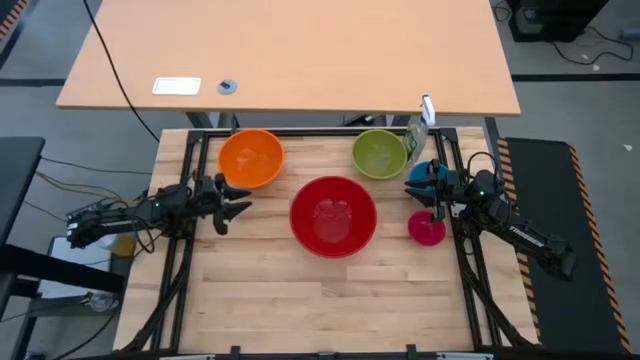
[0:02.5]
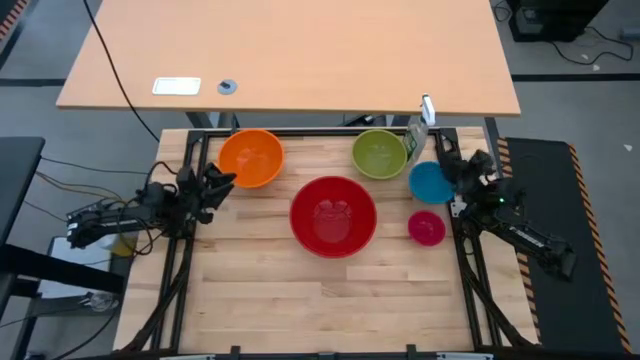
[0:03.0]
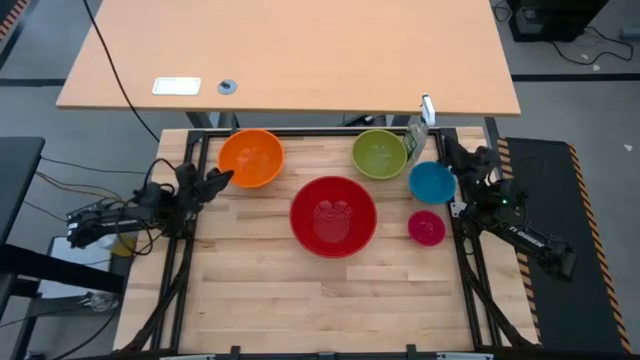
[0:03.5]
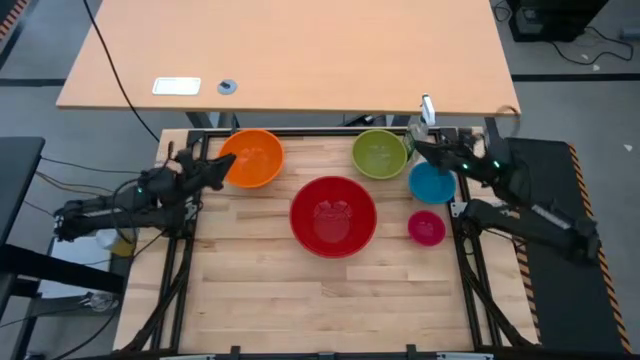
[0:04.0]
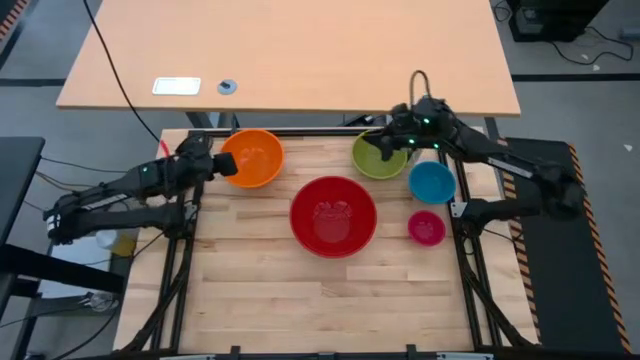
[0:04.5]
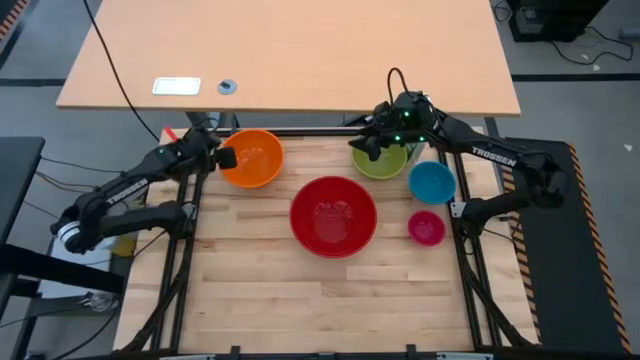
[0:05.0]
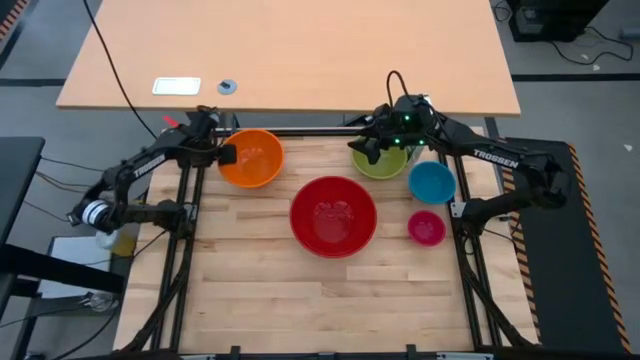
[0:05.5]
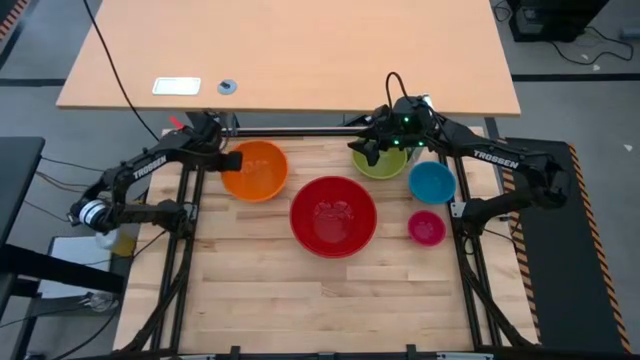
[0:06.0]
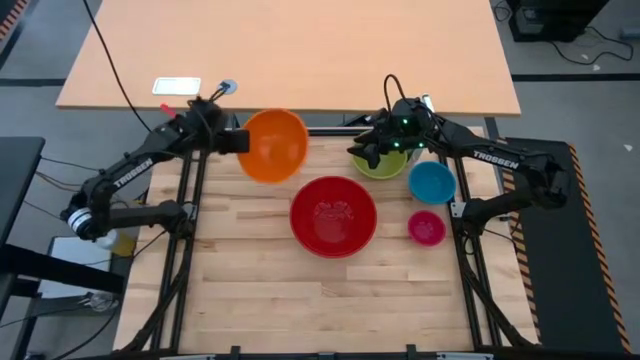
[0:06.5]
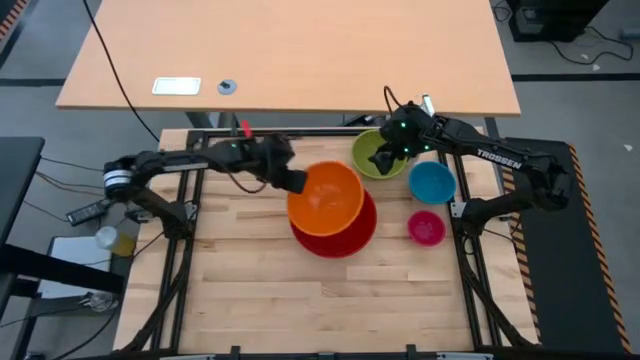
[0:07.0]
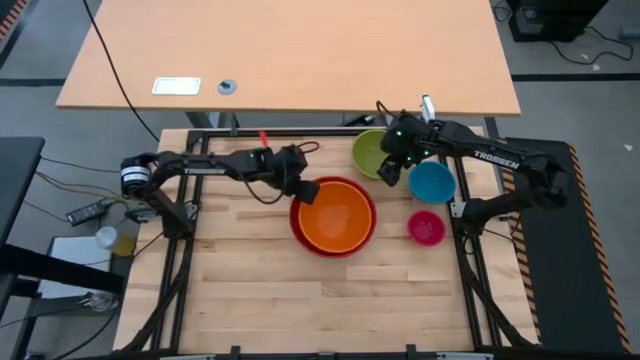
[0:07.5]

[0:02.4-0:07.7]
Stack the orange bowl on top of the red bowl

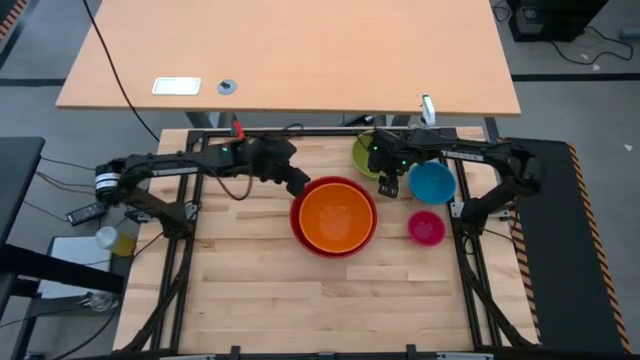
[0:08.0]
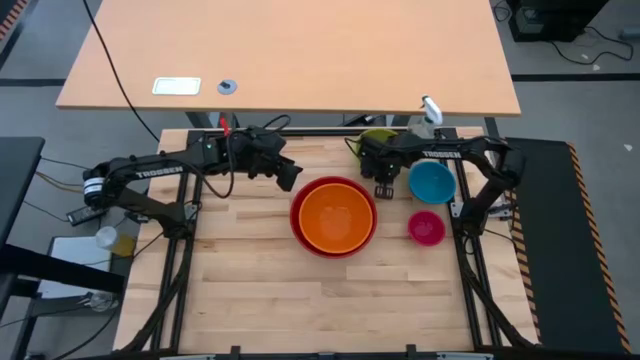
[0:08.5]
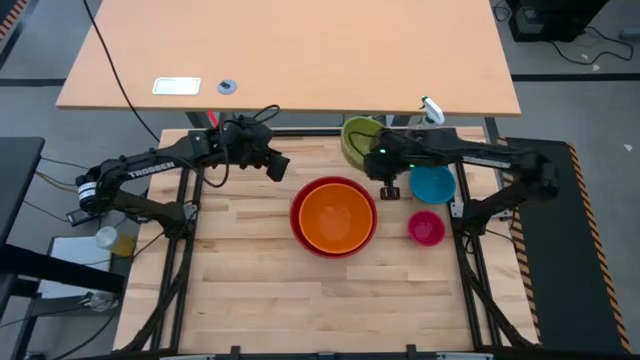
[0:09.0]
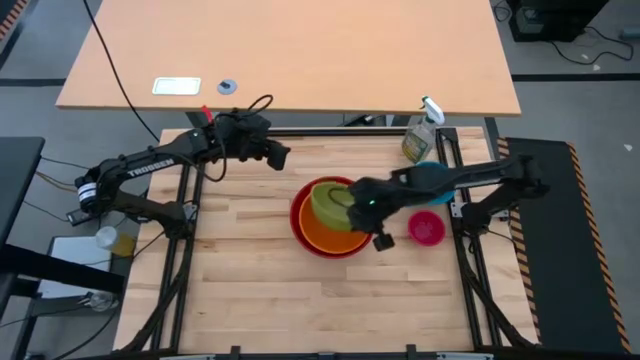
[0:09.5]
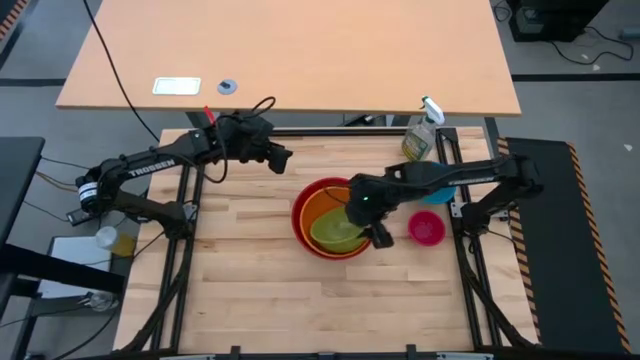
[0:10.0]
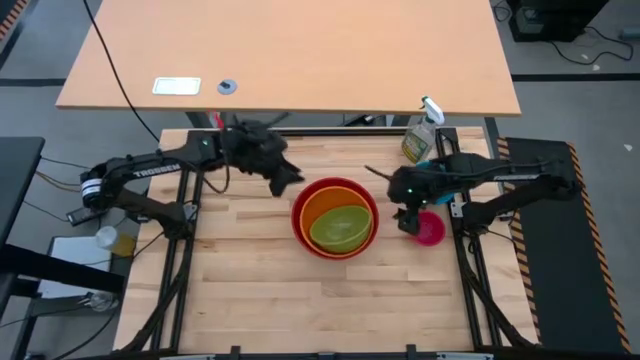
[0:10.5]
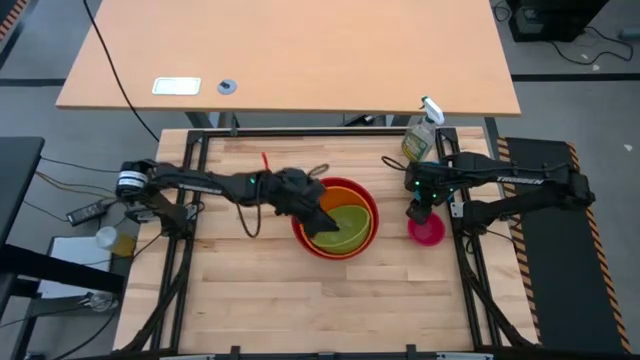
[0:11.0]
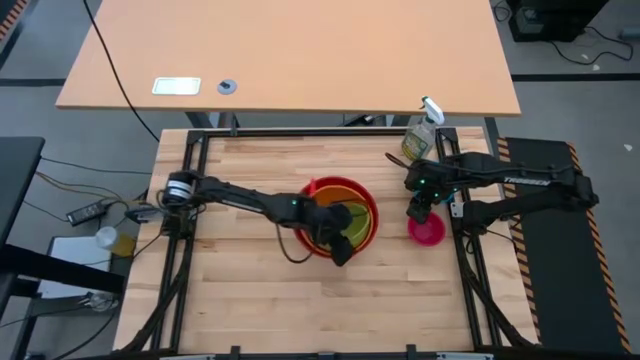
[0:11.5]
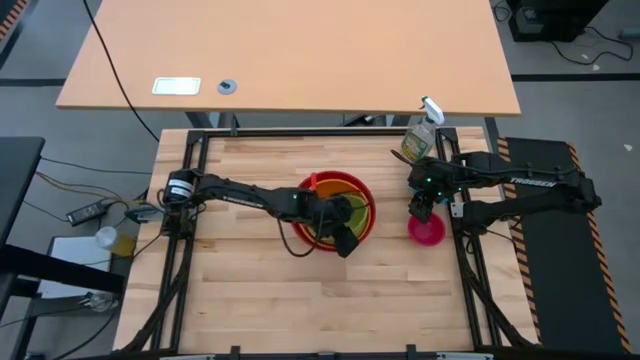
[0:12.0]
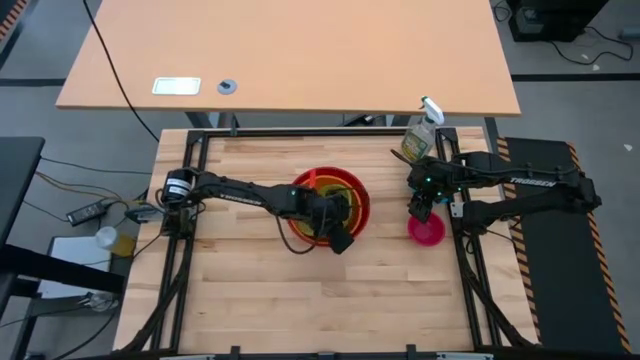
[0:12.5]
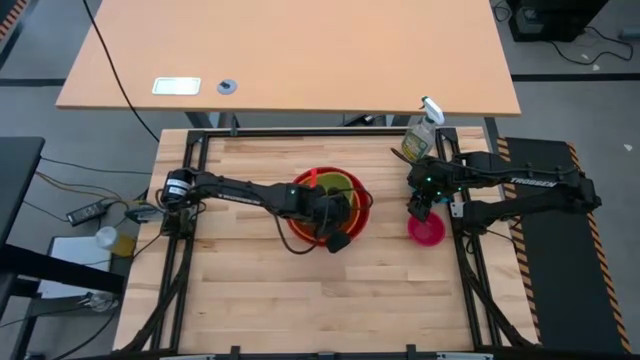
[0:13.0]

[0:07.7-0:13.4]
Stack the light green bowl on top of the orange bowl

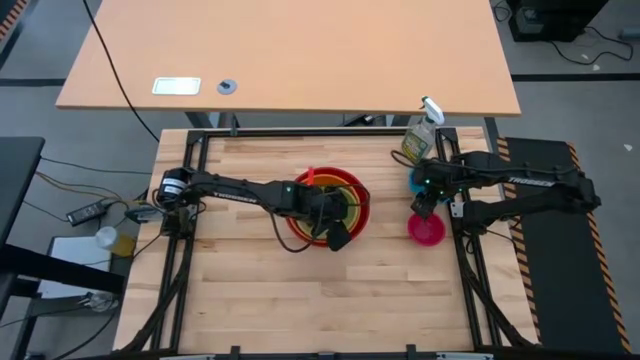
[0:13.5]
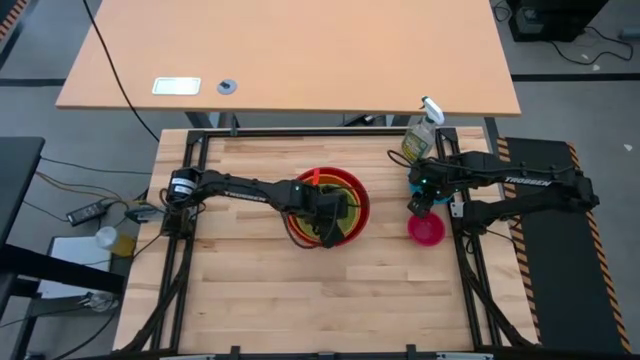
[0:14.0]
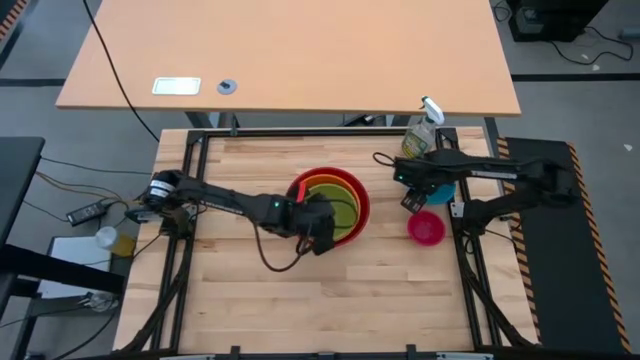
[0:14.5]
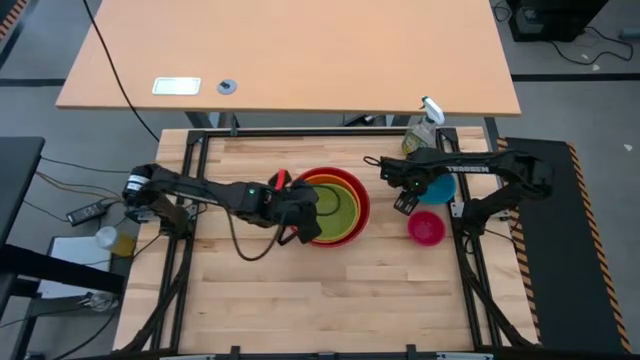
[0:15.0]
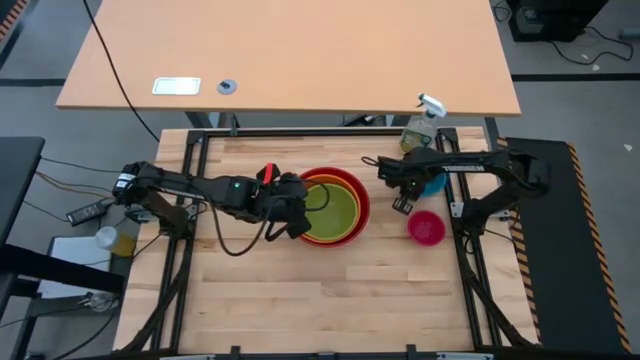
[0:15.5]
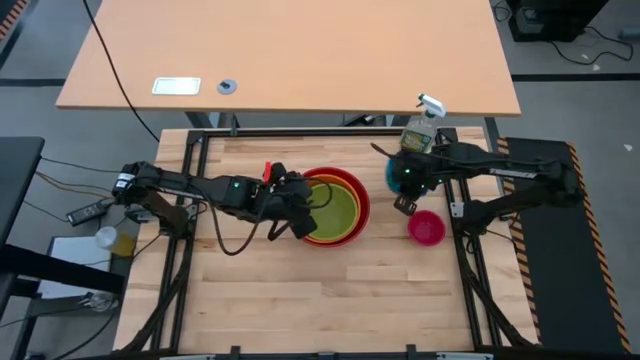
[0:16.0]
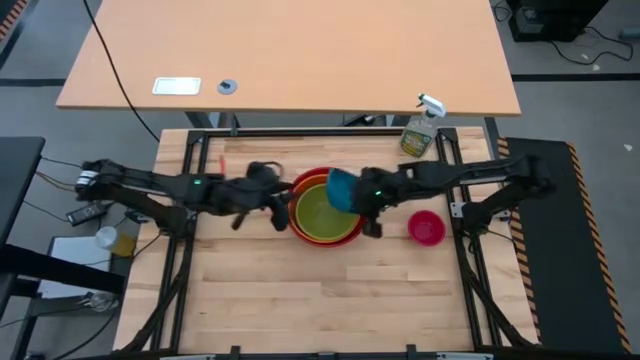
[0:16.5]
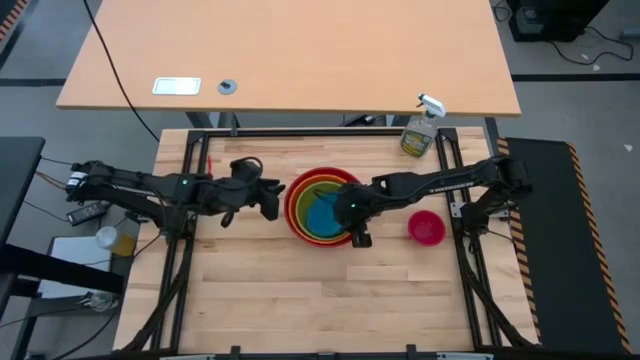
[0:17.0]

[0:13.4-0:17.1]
Stack the blue bowl on top of the light green bowl

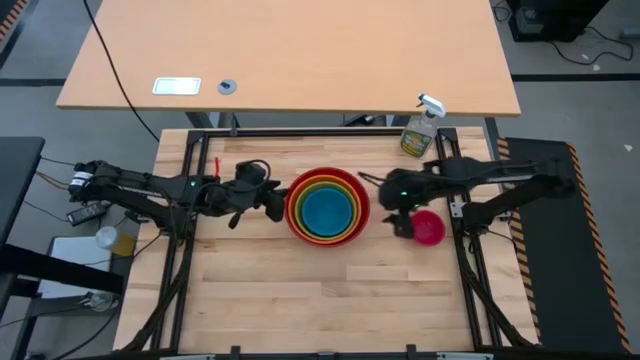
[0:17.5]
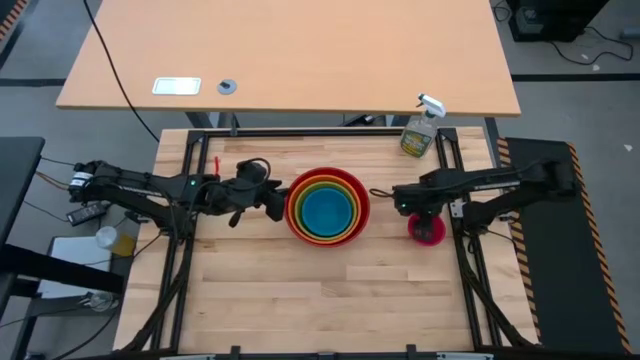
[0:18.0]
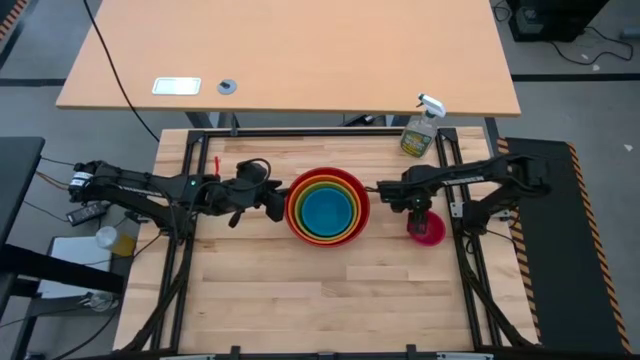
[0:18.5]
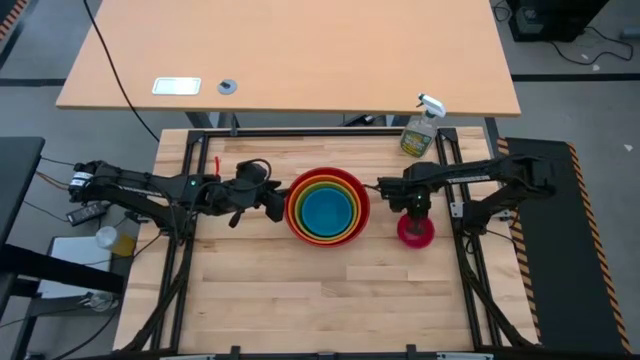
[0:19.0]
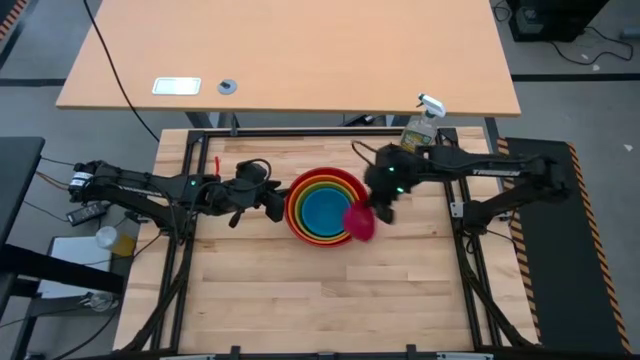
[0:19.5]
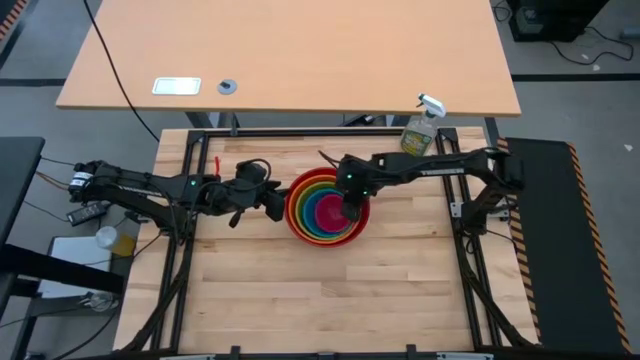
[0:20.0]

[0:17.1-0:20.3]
Stack the red bowl on top of the blue bowl

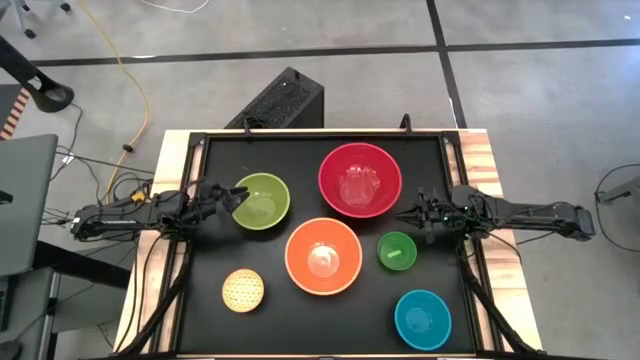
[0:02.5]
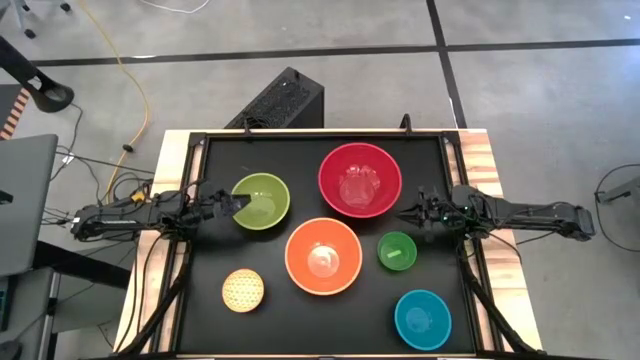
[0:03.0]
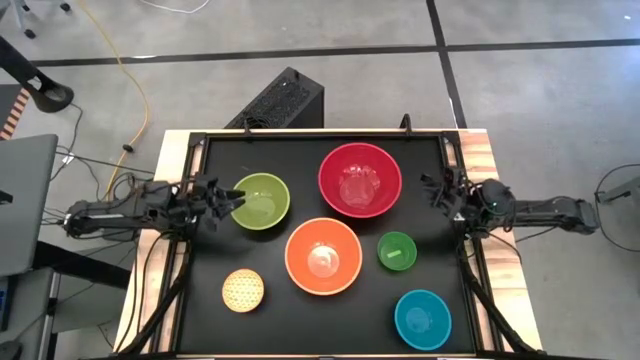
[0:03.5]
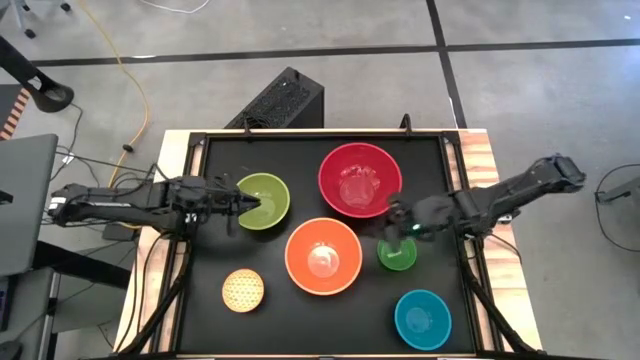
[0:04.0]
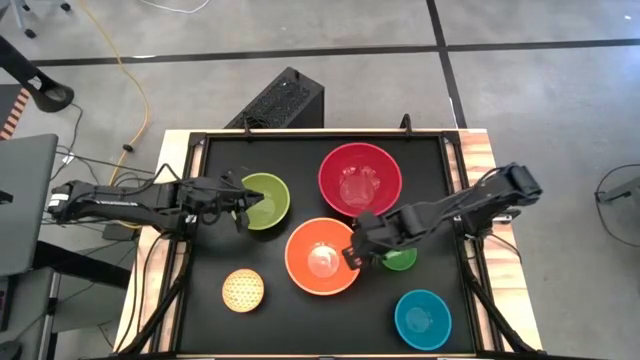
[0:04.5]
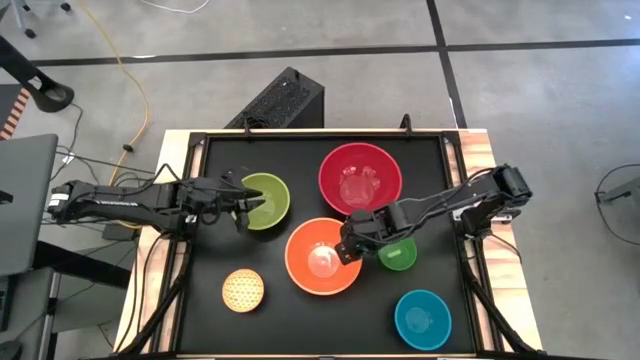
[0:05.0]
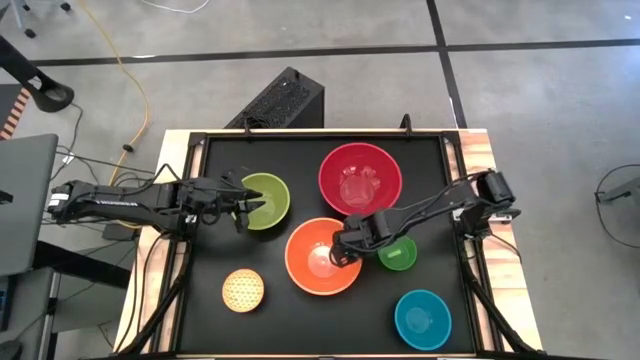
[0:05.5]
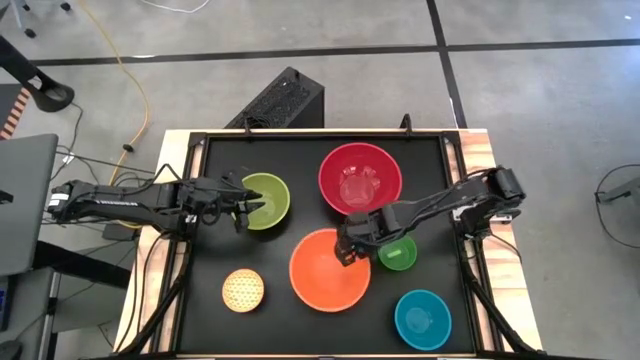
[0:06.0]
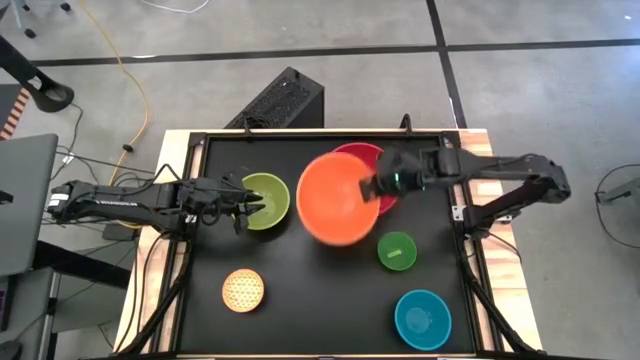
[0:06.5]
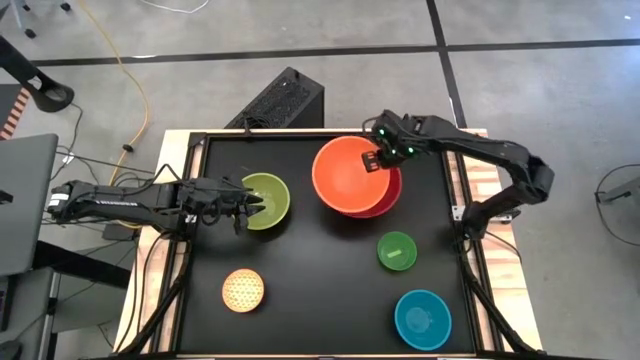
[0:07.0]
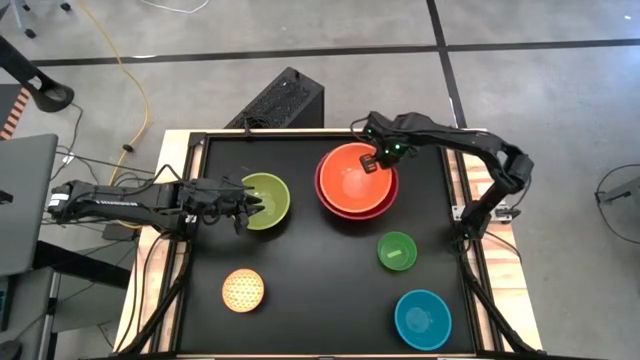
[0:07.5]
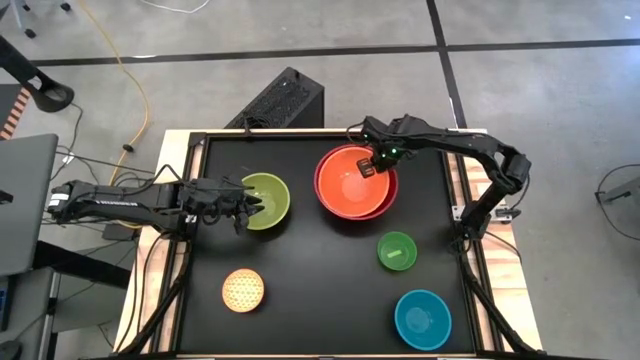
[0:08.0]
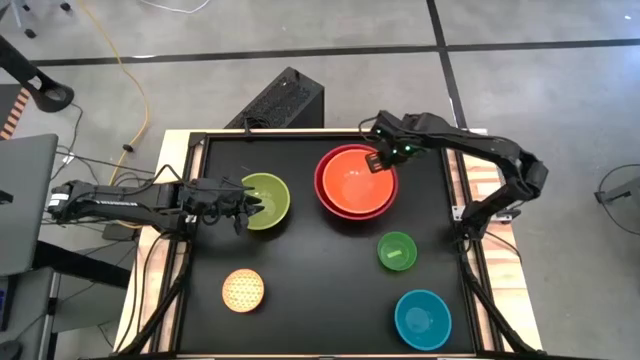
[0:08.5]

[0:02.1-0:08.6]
Stack the orange bowl on top of the red bowl
